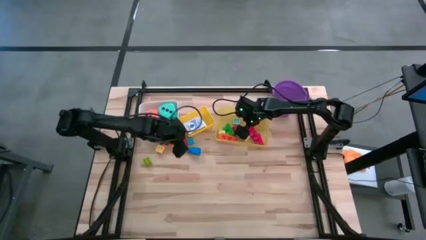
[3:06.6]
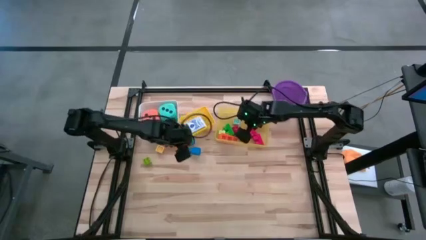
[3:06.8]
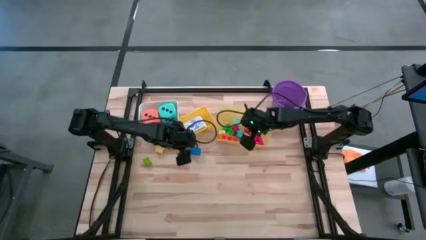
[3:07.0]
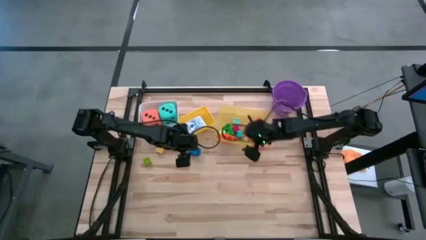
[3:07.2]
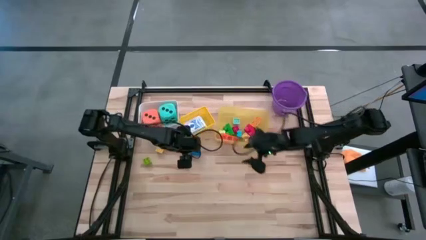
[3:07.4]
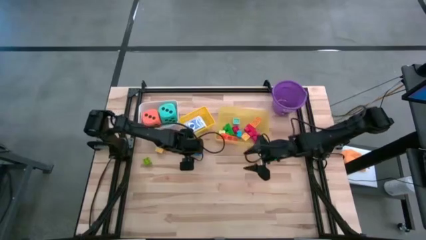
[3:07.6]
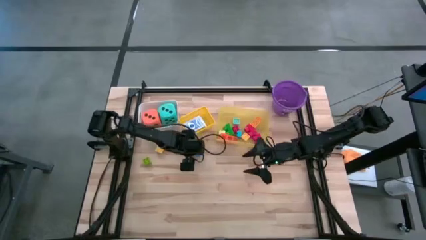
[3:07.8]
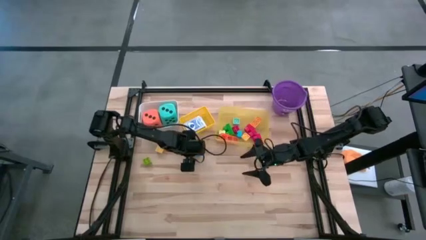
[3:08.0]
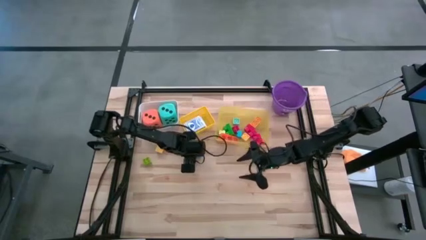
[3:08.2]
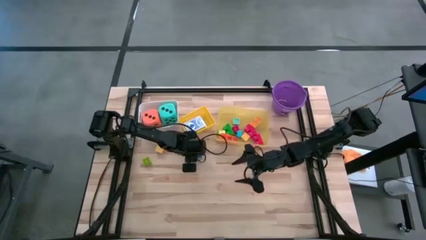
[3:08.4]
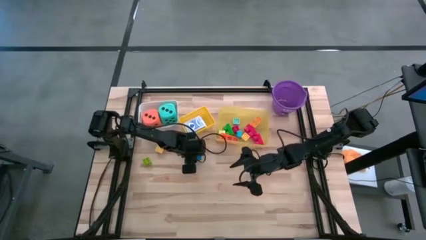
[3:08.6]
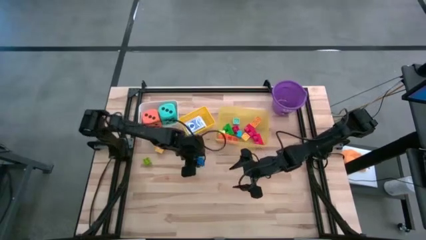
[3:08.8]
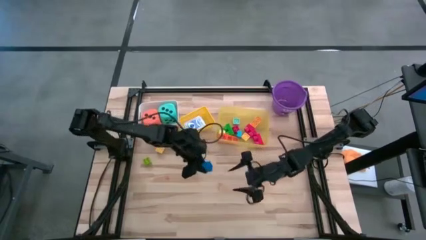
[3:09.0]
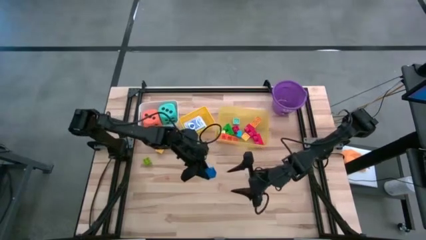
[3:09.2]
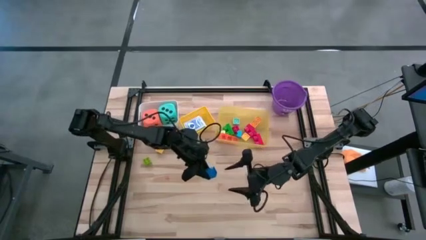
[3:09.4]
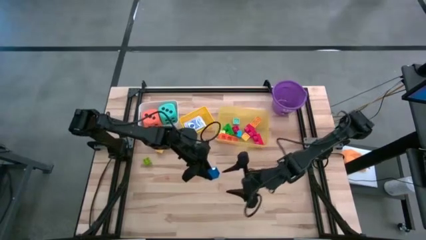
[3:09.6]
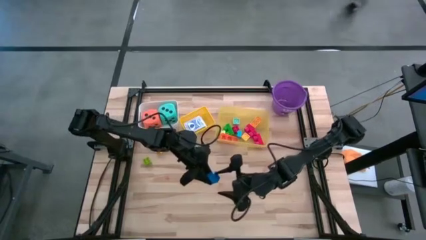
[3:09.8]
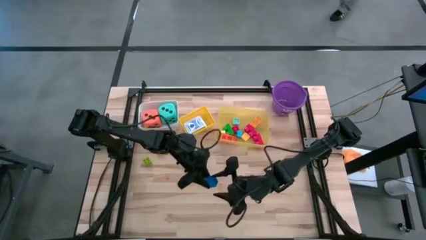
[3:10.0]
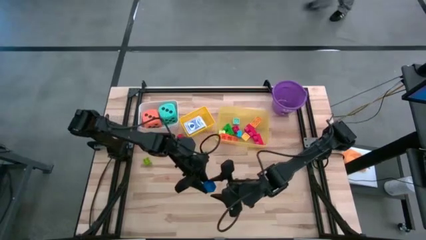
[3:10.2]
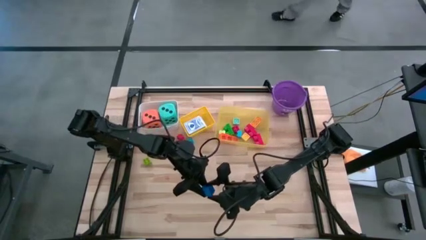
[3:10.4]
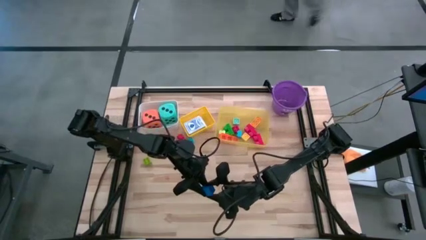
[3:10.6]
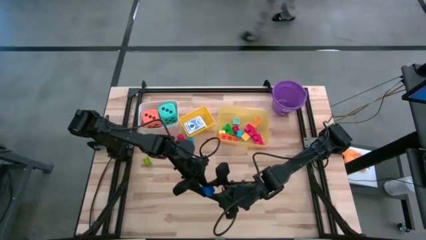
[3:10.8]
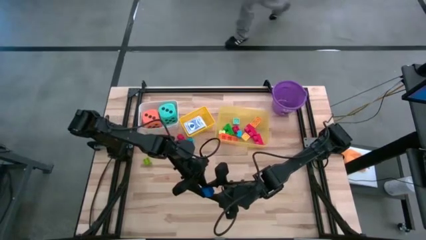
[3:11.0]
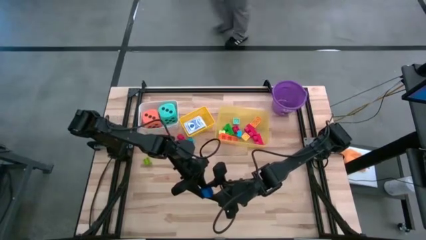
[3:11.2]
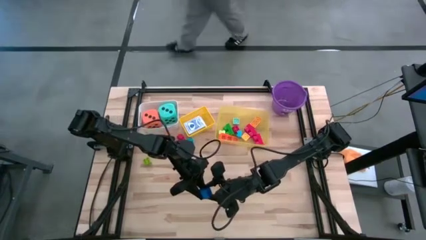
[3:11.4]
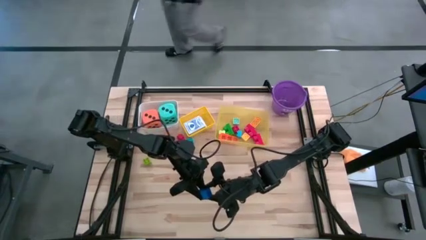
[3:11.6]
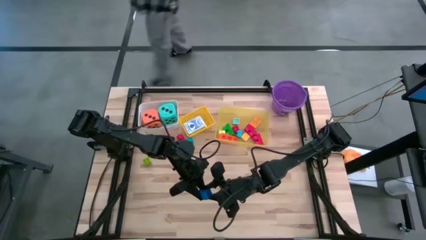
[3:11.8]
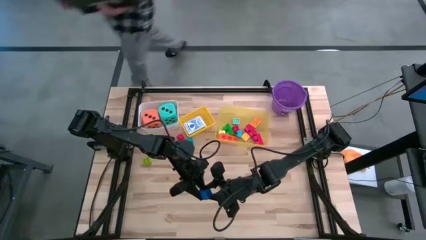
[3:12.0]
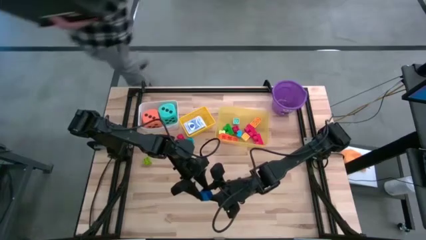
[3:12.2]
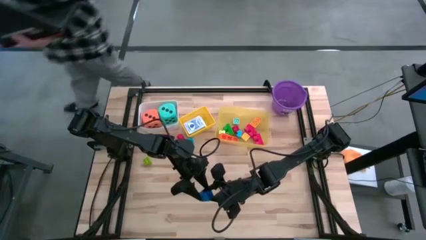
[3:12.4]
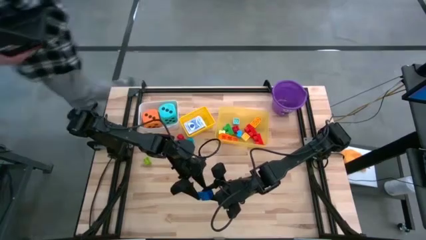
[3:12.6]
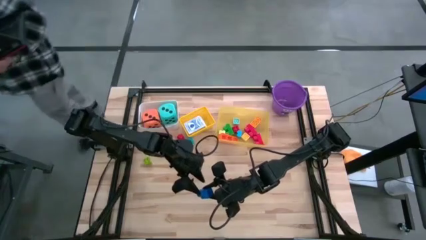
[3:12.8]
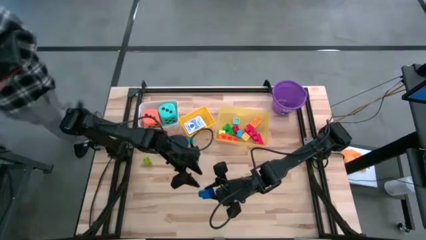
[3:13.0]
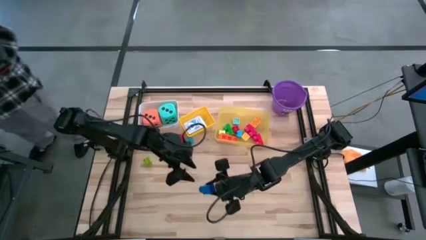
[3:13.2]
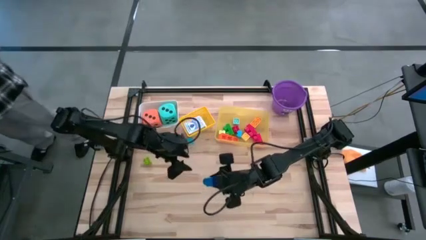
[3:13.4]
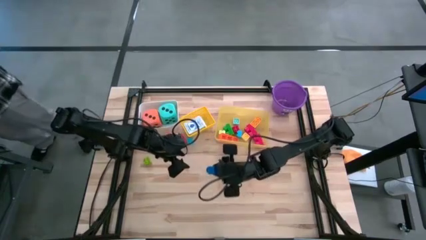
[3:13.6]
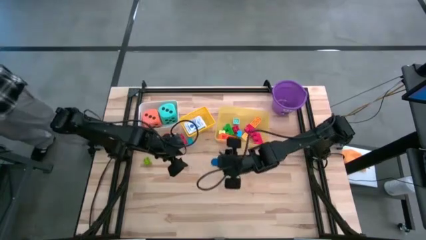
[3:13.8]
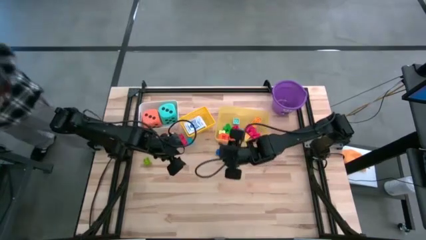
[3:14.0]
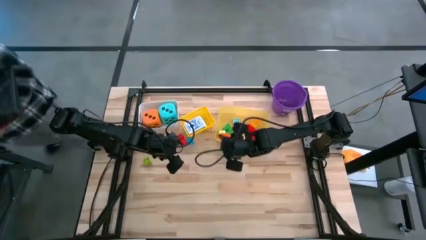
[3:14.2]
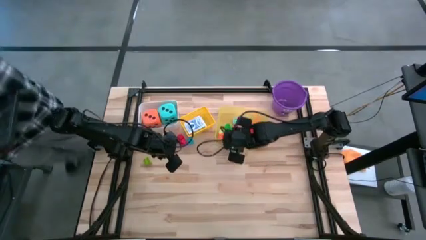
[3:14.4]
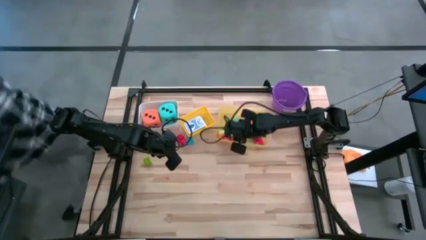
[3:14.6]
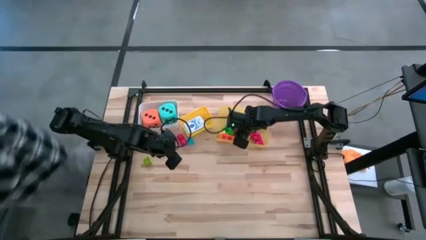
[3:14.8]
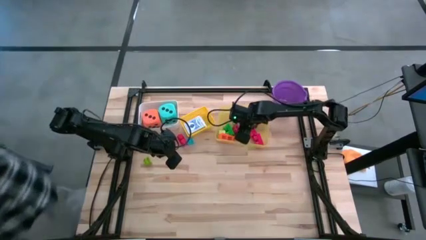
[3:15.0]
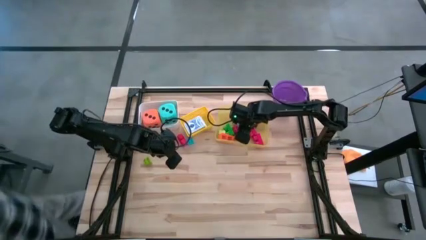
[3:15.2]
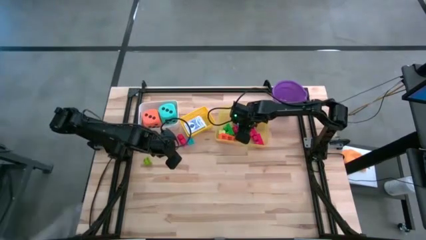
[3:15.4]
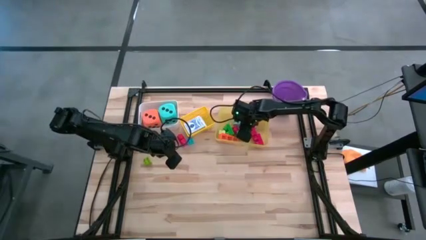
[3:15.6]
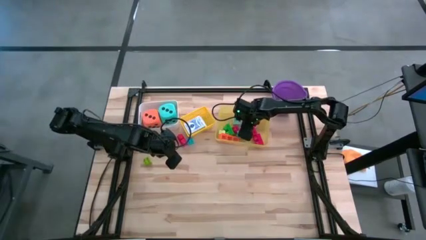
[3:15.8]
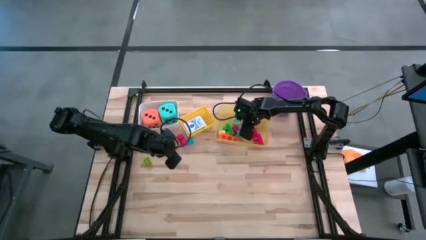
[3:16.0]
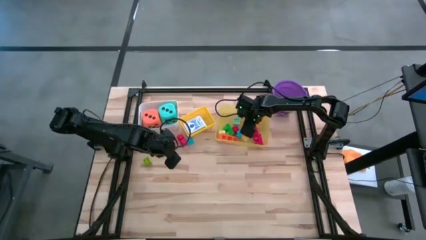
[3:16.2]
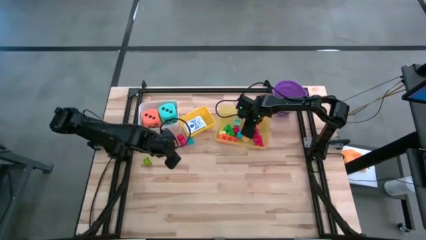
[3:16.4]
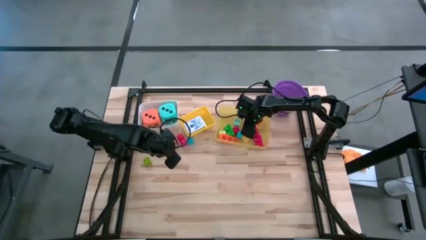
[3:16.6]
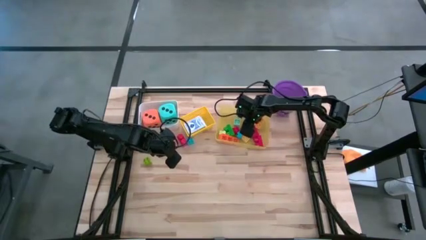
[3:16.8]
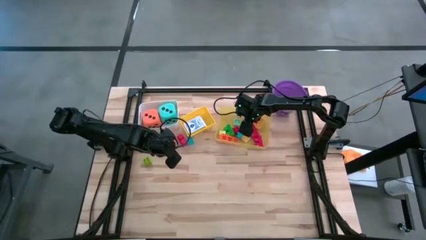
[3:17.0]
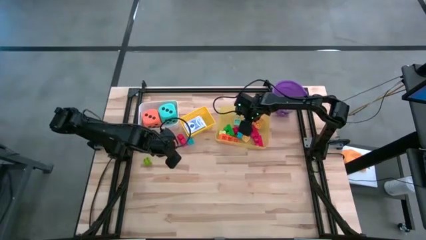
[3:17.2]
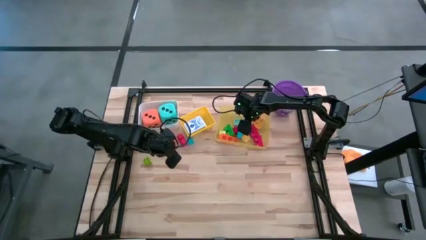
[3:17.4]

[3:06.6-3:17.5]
Task: Pick & Place Toys
Put the dark blue game piece into the yellow bin

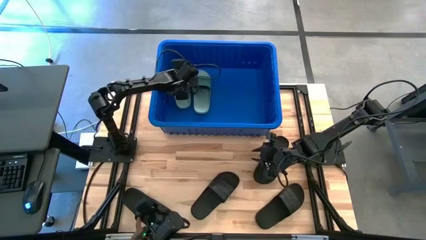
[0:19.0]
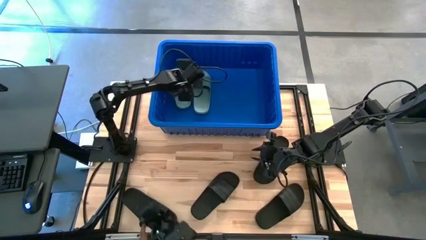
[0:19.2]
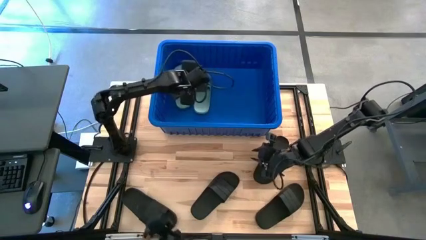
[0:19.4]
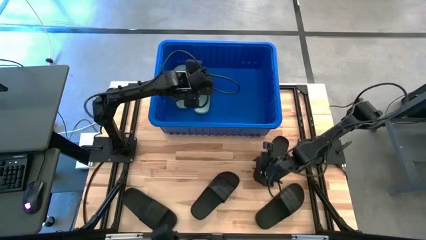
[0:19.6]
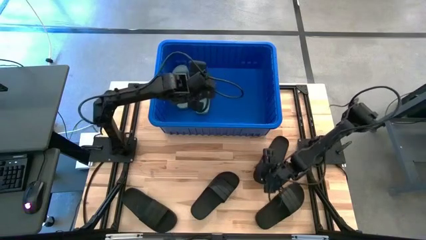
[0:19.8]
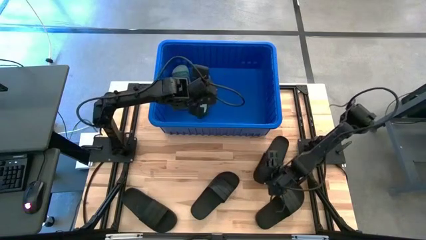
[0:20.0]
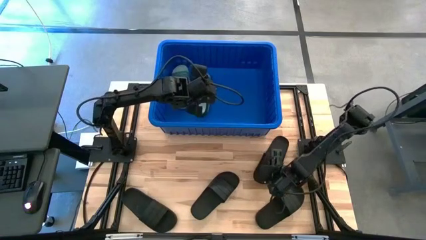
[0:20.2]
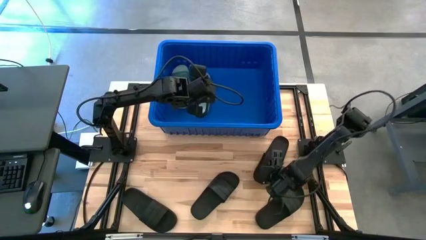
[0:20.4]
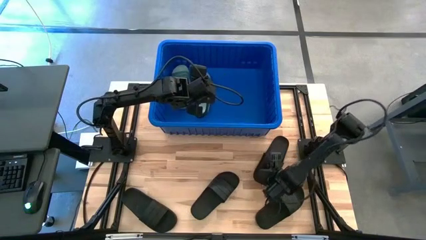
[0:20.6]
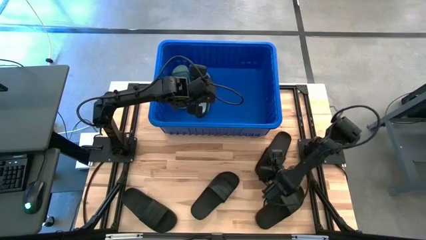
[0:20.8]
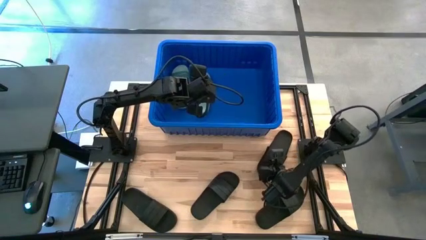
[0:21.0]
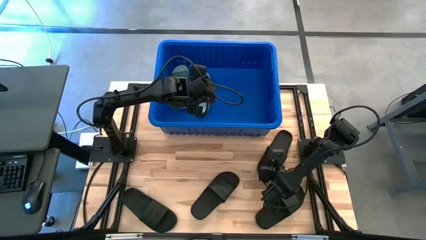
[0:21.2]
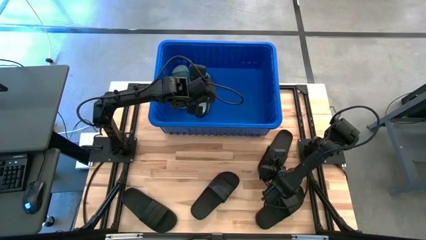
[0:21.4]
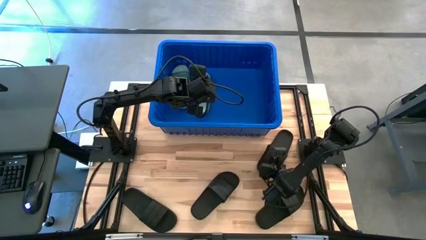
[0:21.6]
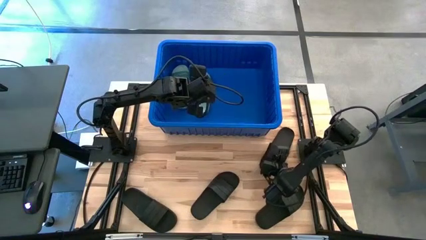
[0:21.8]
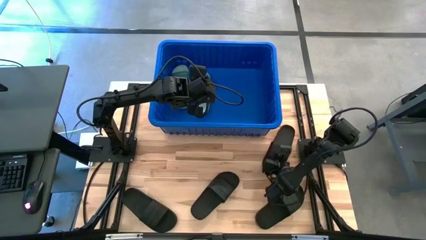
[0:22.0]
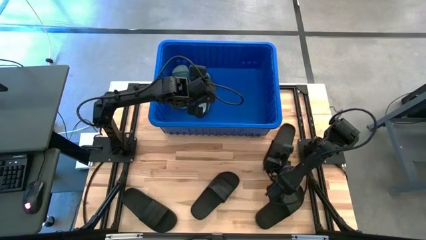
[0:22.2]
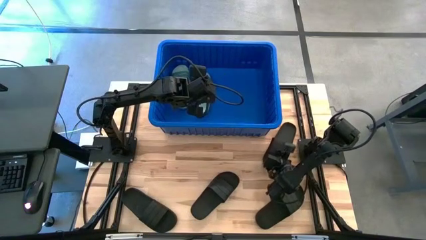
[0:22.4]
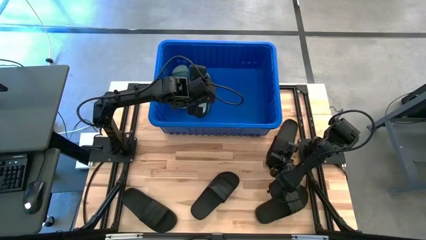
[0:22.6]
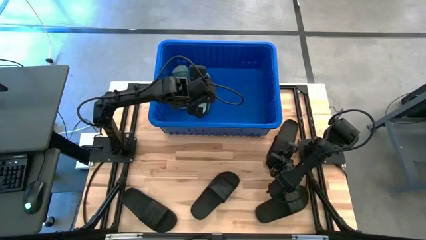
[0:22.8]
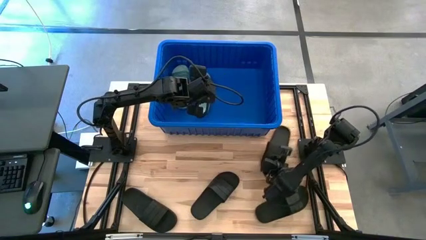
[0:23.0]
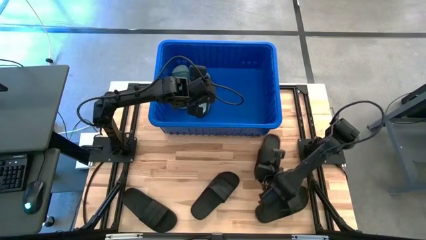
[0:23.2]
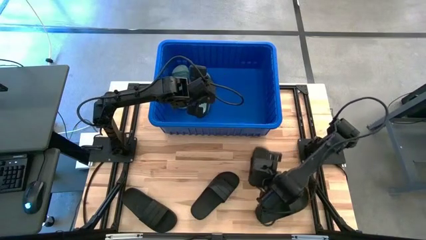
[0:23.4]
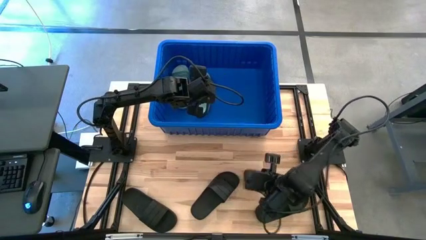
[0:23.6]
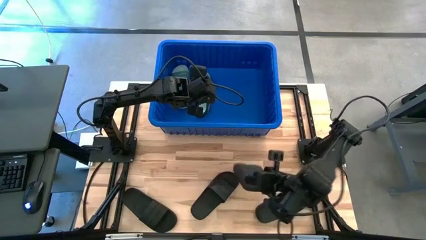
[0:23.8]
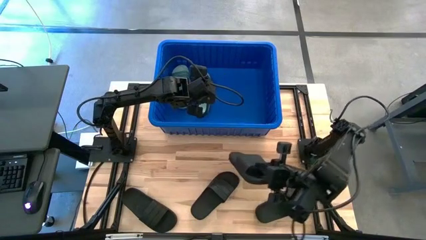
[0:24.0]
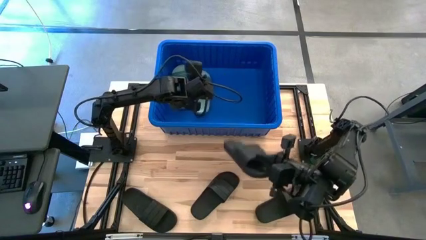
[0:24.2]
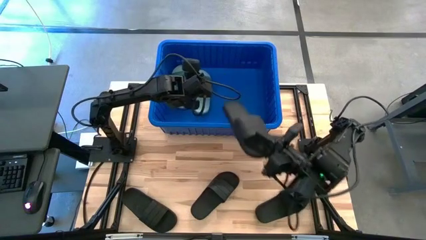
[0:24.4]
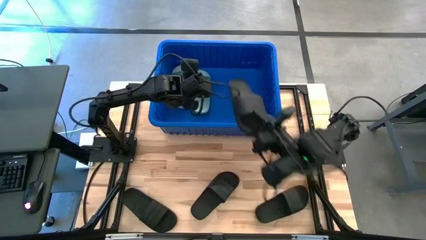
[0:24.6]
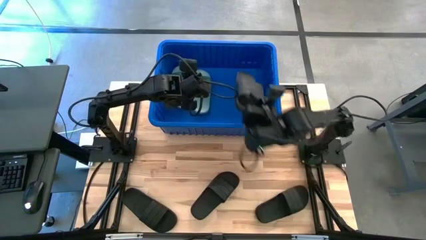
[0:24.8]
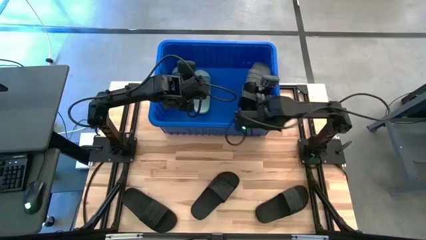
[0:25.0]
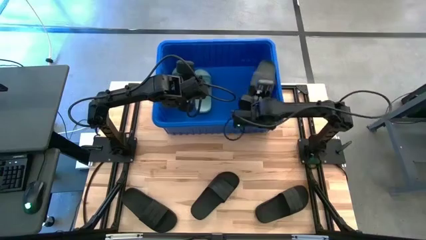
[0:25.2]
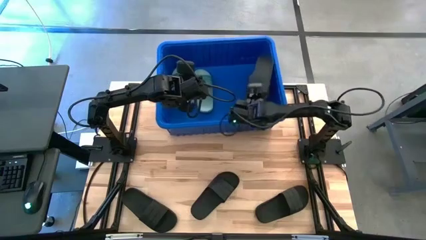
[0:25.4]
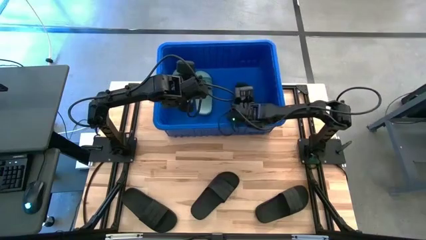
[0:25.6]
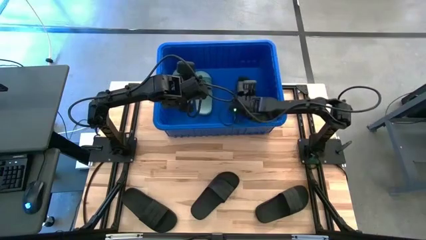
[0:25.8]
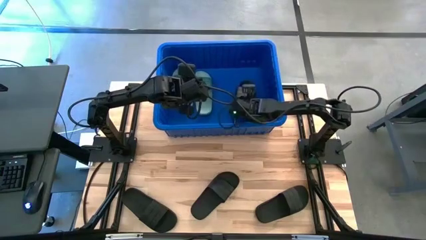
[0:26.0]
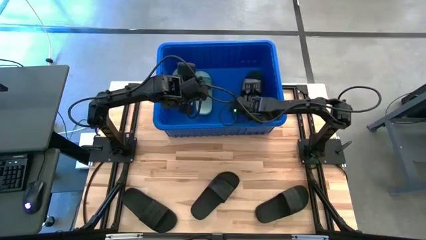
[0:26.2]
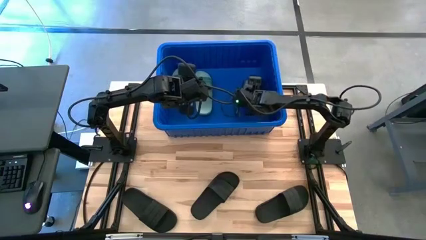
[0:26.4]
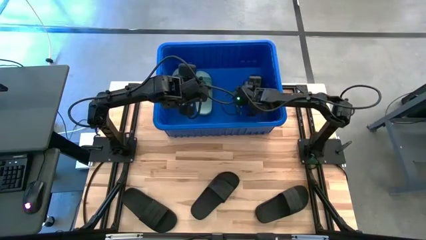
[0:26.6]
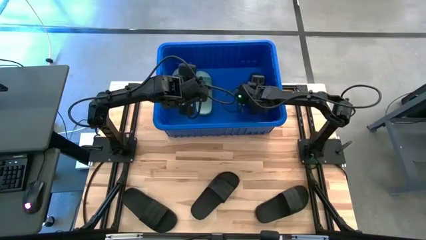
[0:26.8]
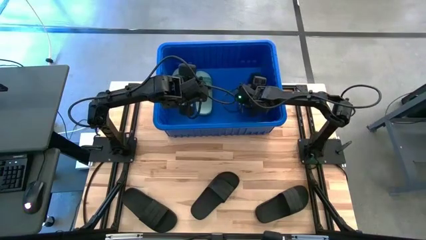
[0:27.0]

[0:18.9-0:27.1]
Task: Pick and place slides into bin
Put the black slide into the blue bin
